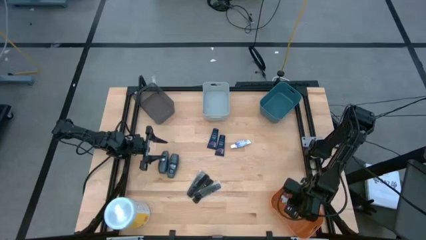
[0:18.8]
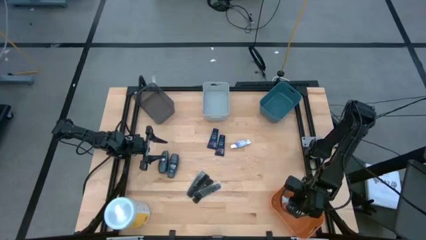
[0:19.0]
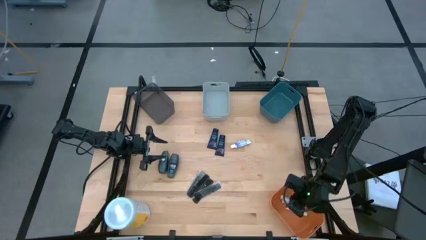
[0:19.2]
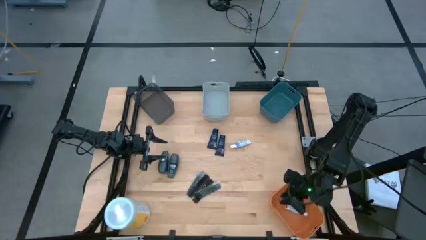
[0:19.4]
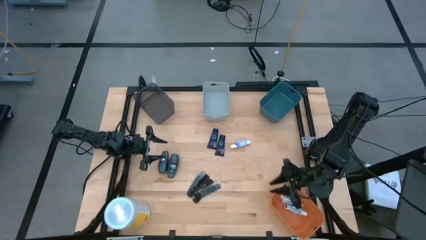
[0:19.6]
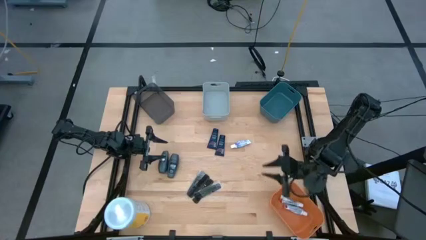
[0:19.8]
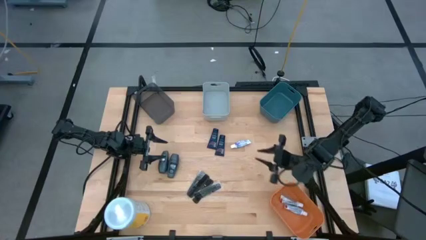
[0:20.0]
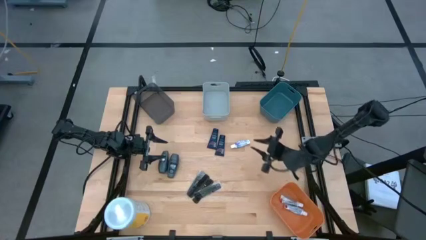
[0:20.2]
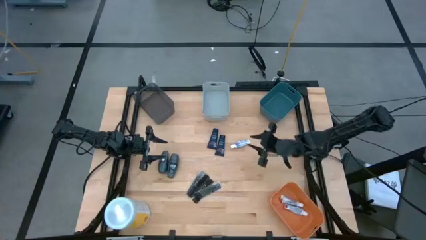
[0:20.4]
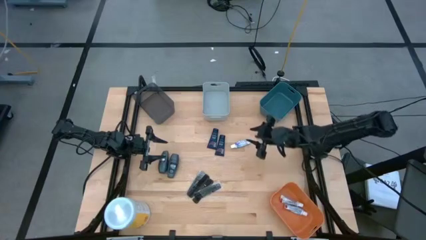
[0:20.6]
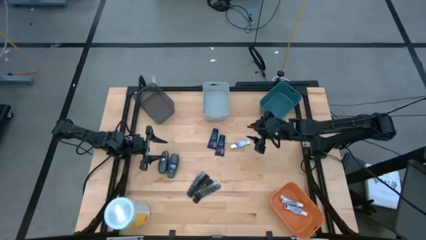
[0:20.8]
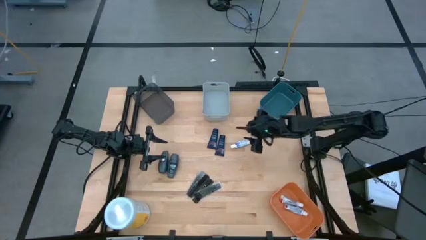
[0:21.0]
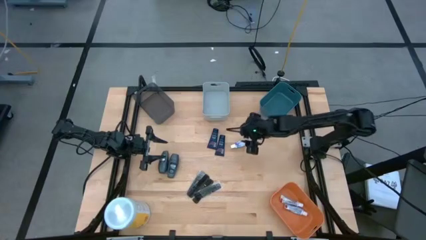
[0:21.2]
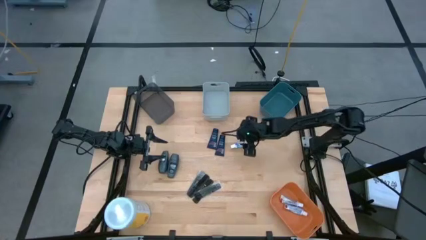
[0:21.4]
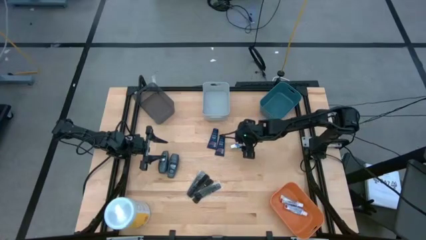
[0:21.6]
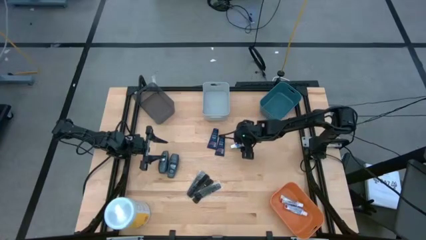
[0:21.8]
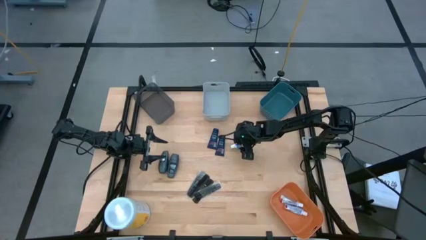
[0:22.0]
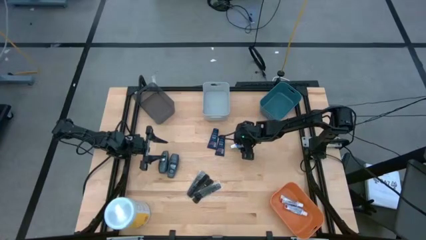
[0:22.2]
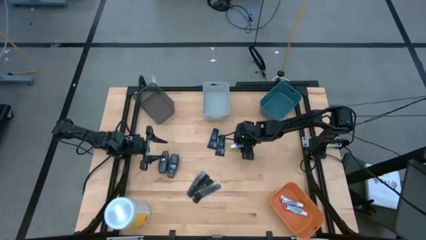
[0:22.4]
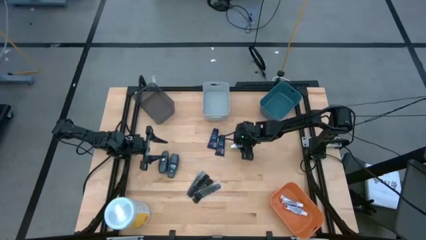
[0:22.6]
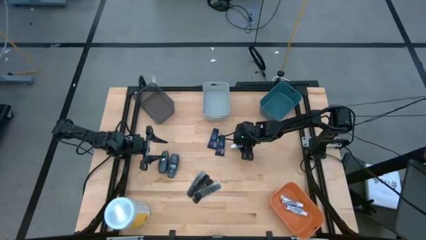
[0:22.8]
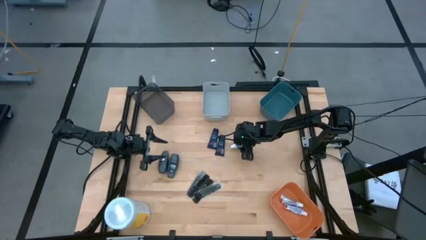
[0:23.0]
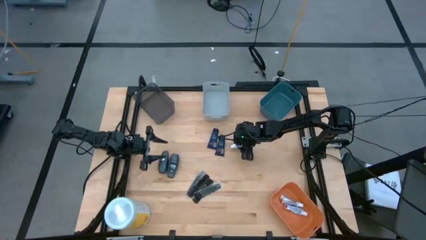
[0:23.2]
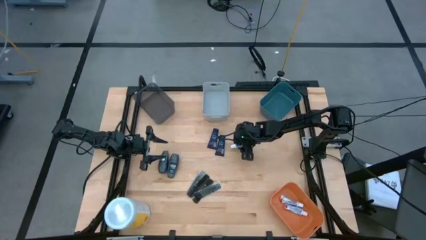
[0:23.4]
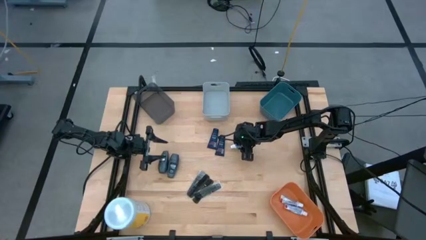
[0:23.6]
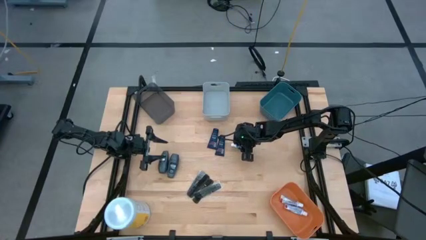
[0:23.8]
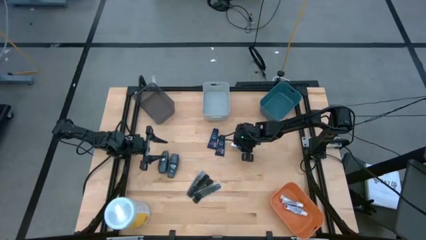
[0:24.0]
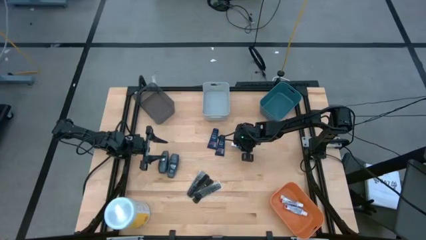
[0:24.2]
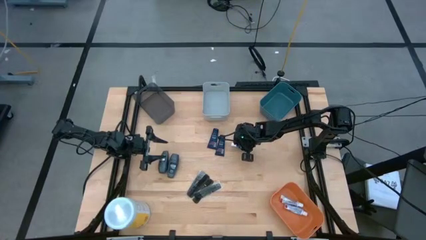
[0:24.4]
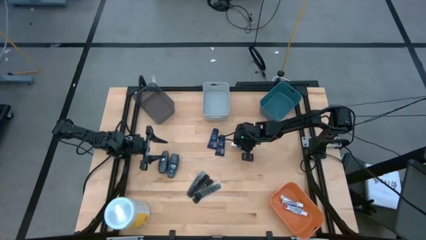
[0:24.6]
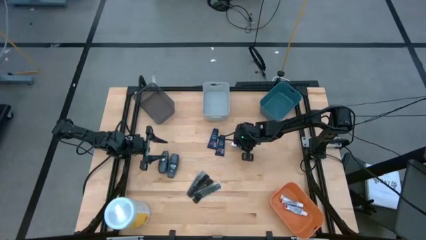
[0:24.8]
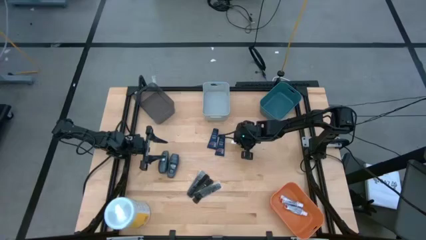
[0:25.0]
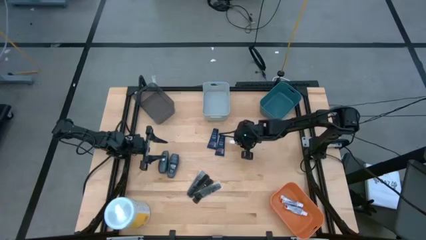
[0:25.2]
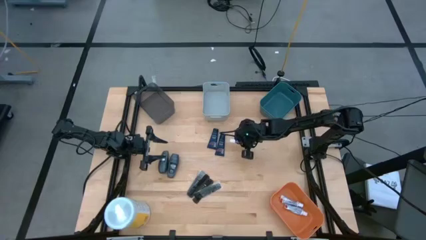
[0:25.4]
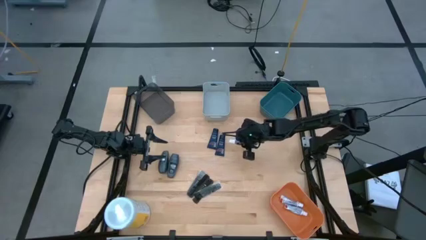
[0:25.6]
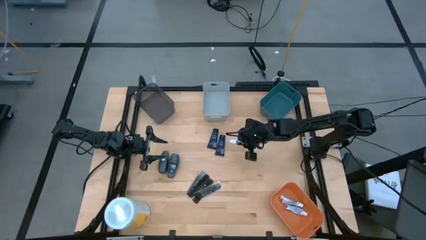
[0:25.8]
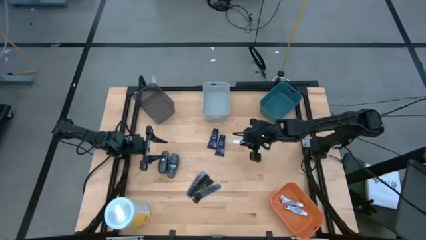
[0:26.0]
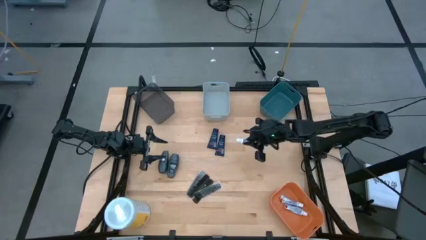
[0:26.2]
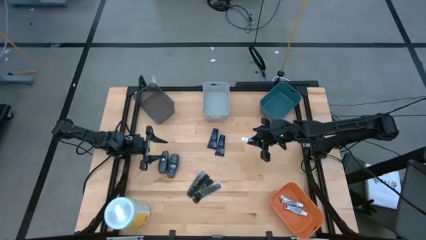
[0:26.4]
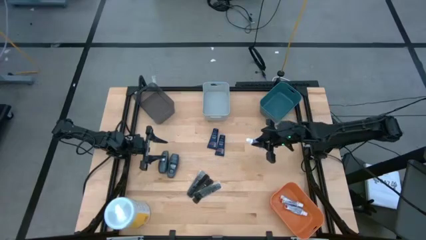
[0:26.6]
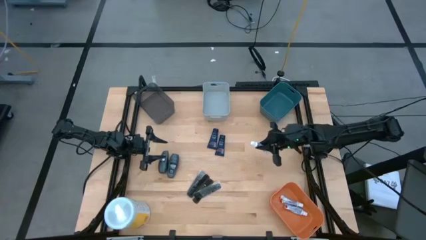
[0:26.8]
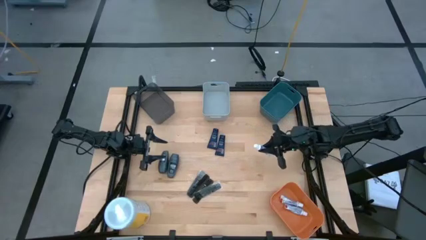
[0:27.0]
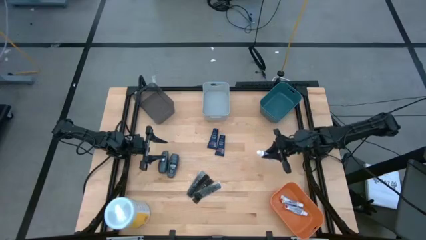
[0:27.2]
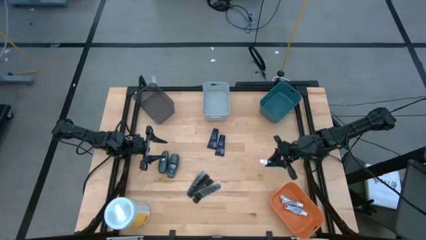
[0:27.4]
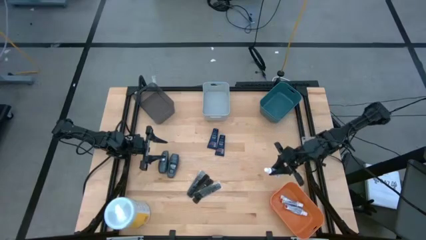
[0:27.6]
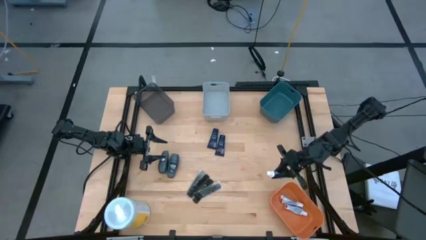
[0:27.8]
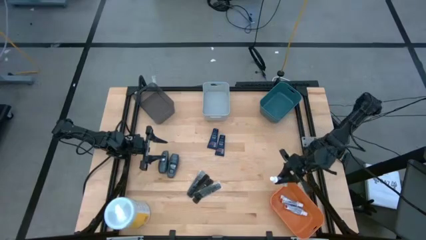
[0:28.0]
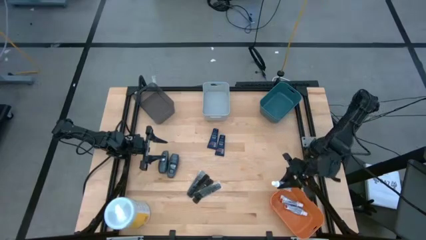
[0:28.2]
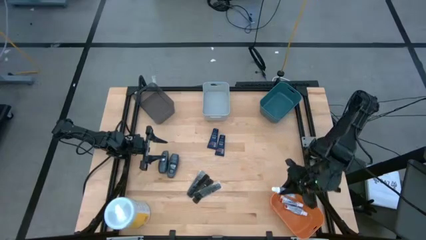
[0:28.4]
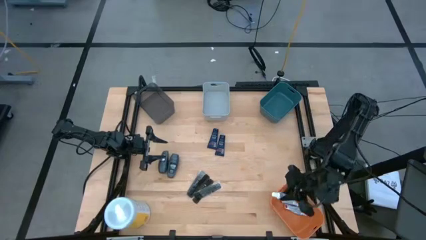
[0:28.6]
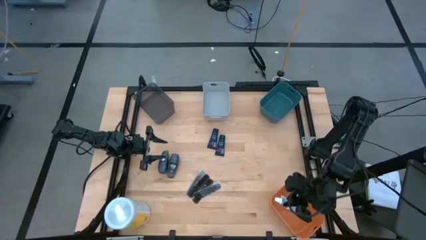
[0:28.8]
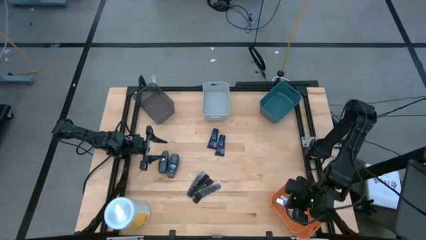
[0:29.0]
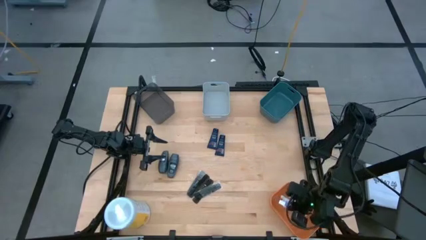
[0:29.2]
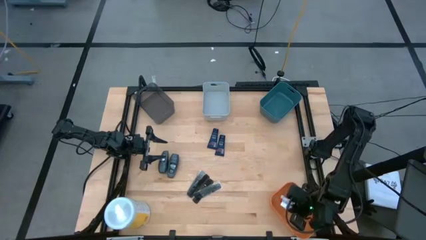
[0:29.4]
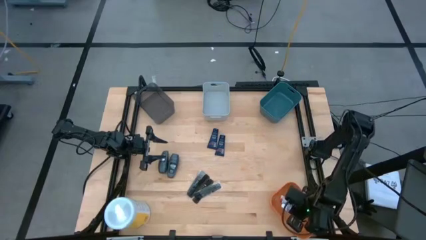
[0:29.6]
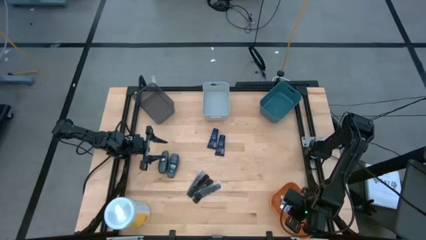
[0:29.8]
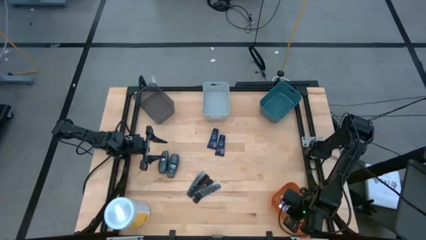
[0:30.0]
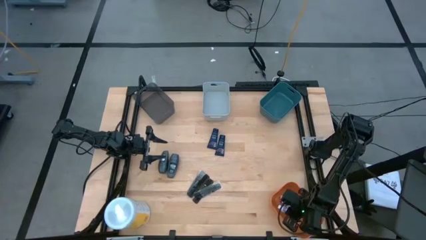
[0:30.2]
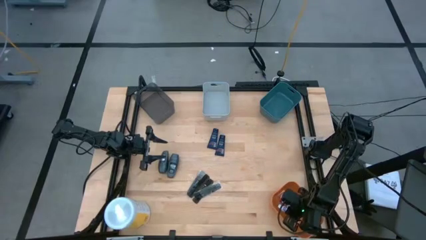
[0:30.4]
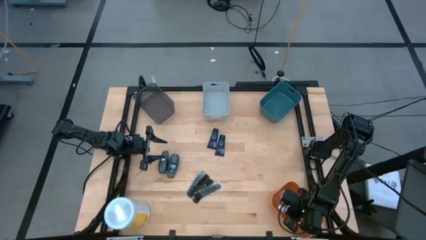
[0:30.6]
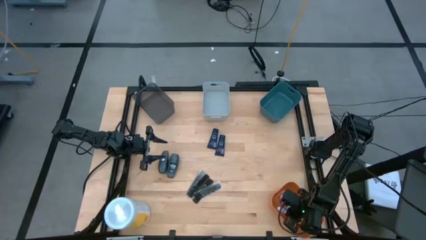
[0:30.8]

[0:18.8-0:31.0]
Task: Pick & Place Travel size toiletries
Put the white toothpaste into the orange bin

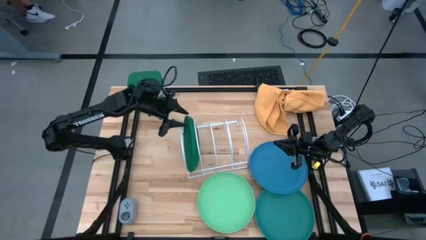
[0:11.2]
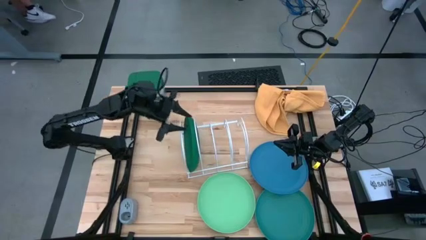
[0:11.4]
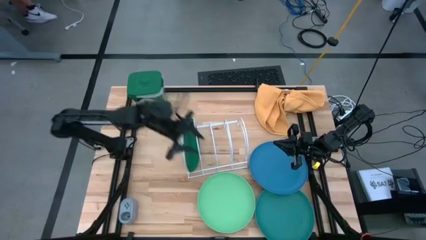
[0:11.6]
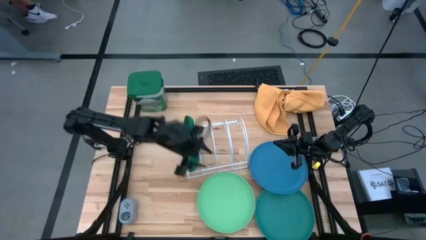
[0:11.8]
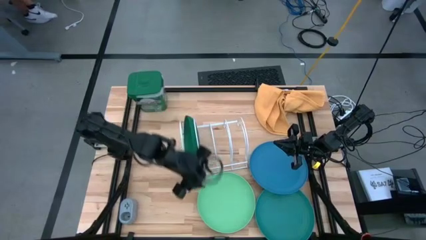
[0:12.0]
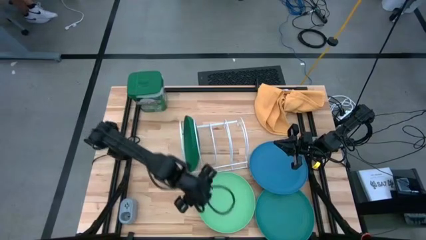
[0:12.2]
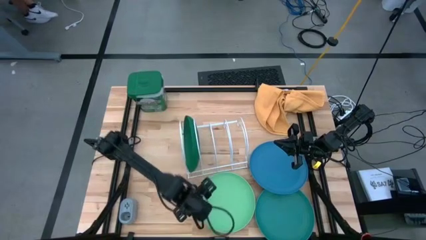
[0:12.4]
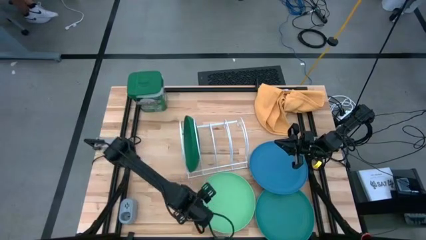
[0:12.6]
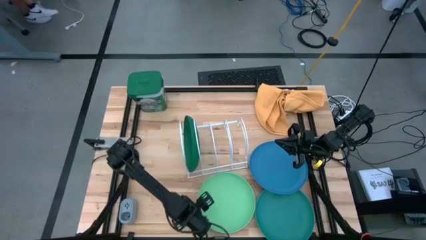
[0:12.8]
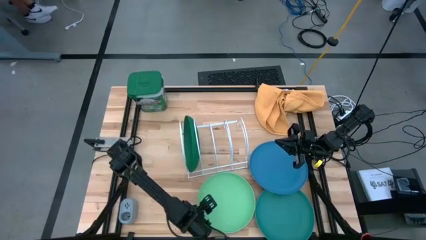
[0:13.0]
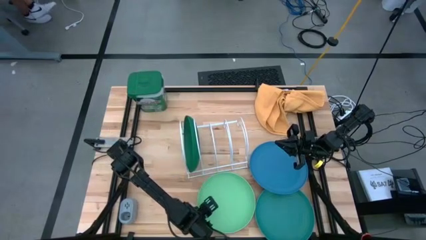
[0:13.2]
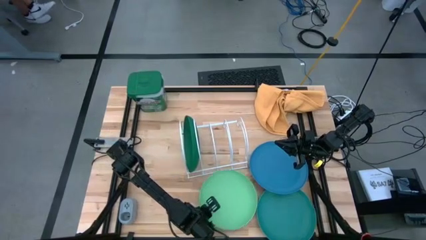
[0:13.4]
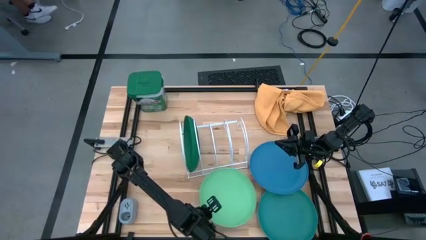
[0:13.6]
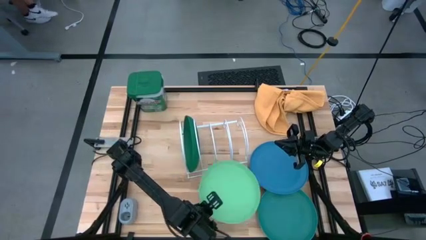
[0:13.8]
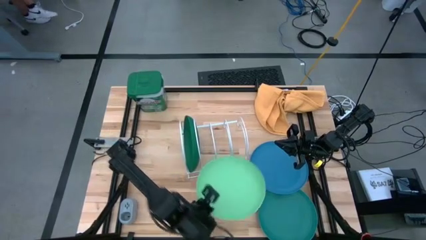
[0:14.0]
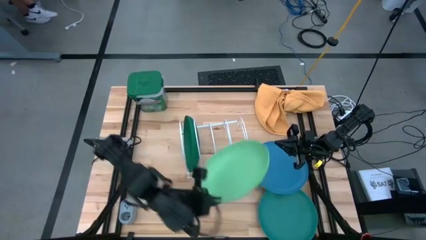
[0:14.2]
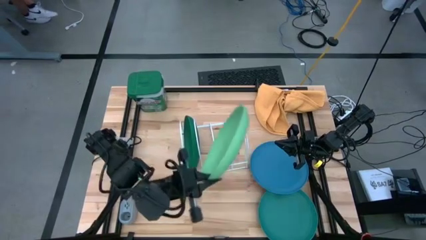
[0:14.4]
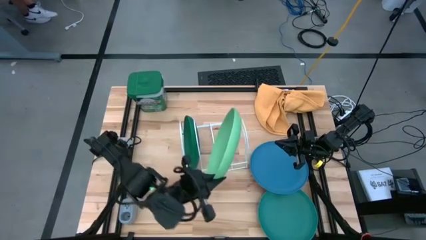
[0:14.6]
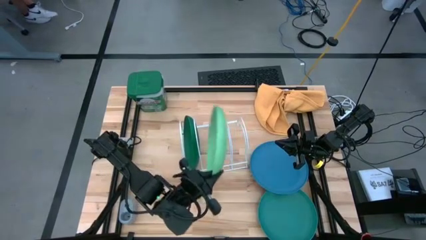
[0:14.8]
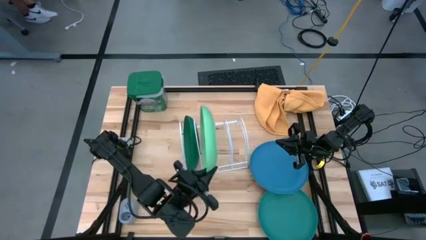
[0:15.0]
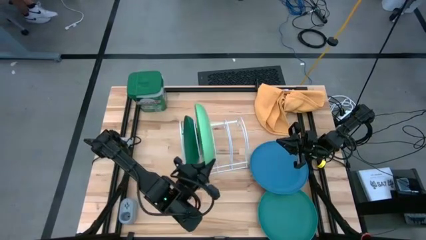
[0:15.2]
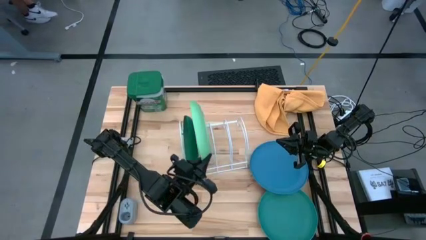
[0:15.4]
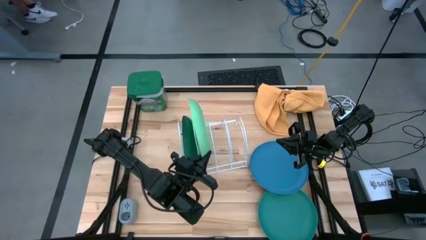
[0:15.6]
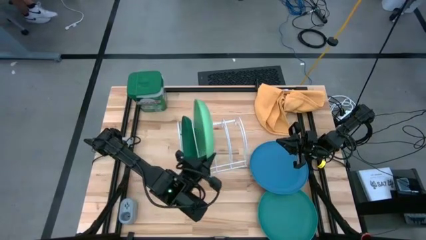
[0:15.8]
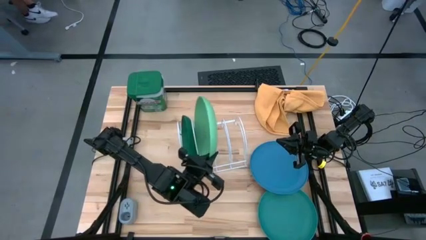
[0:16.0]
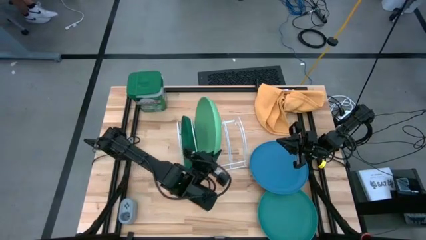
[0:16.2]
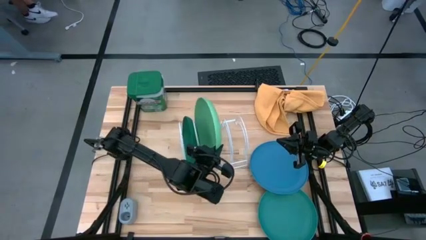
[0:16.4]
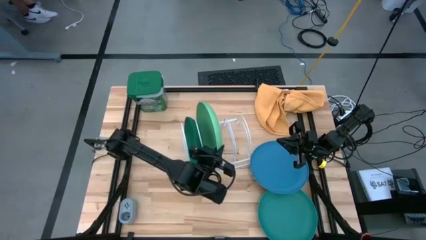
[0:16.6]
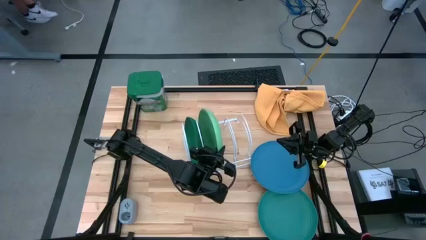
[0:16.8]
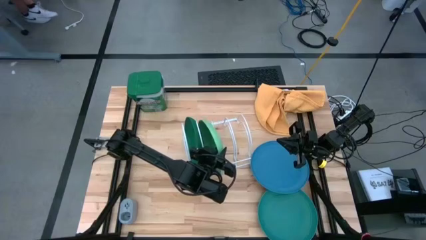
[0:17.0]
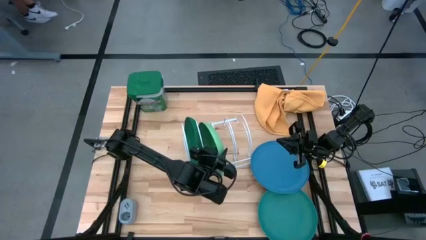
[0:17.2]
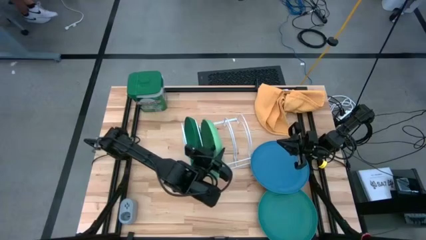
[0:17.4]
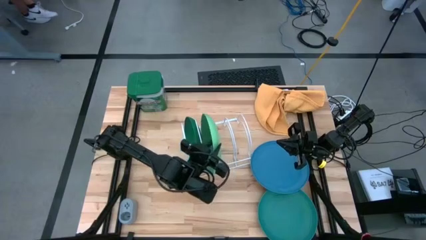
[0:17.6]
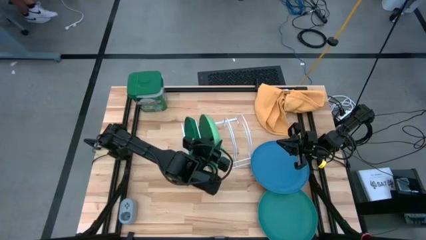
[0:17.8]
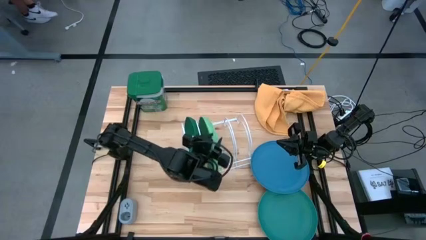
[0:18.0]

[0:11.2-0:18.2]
Task: Sort dishes
Put the light green plate in the dish rack
